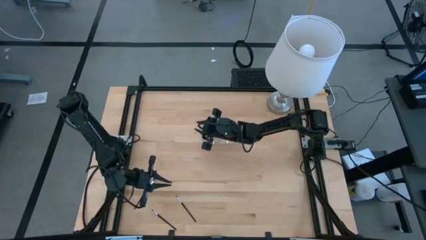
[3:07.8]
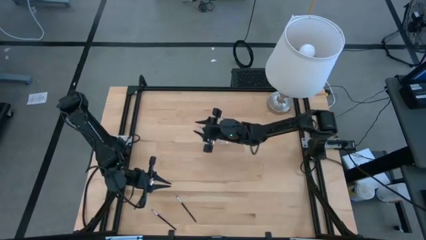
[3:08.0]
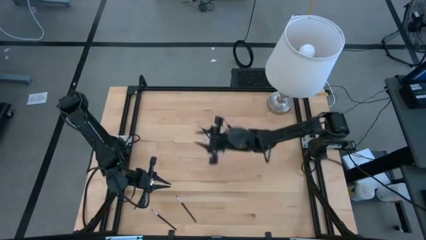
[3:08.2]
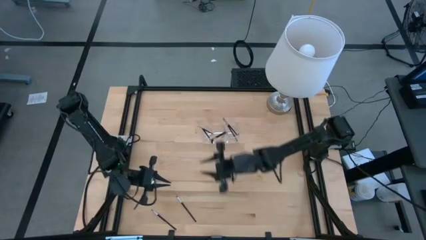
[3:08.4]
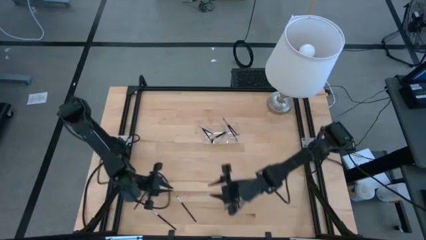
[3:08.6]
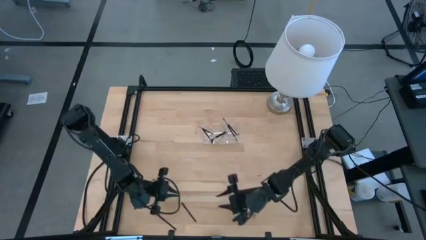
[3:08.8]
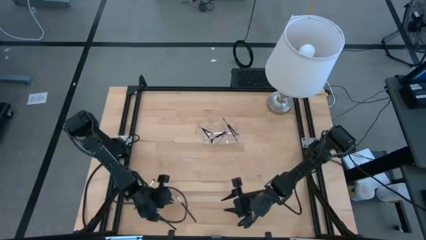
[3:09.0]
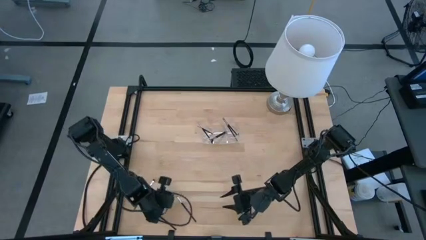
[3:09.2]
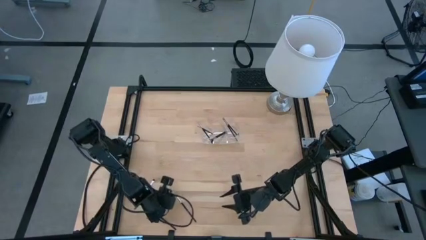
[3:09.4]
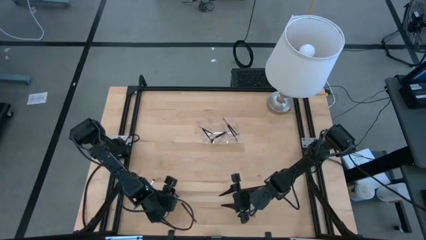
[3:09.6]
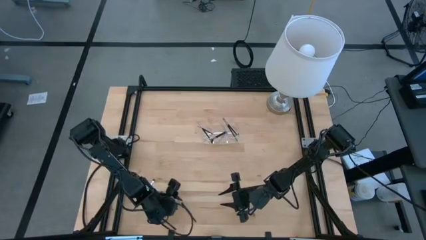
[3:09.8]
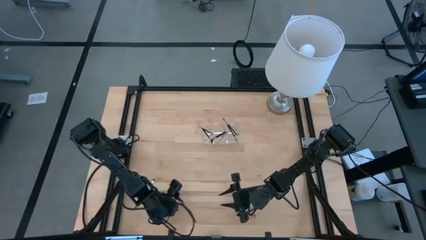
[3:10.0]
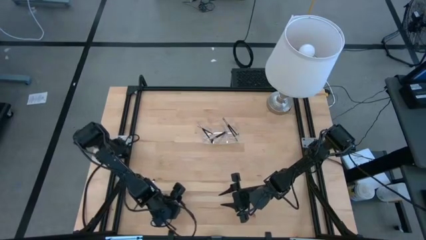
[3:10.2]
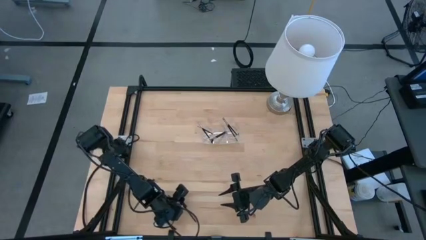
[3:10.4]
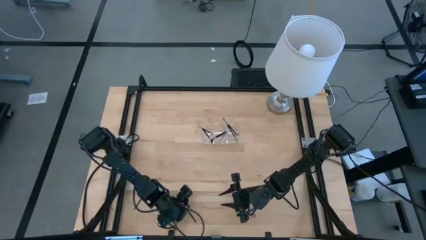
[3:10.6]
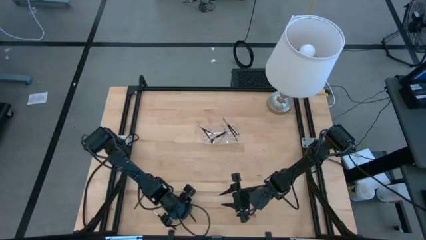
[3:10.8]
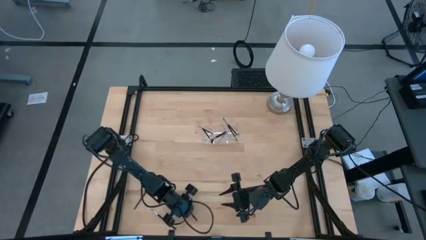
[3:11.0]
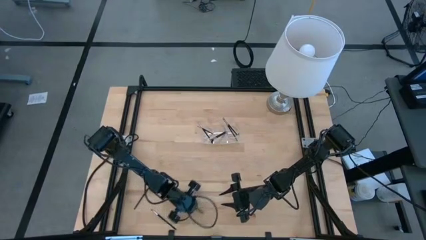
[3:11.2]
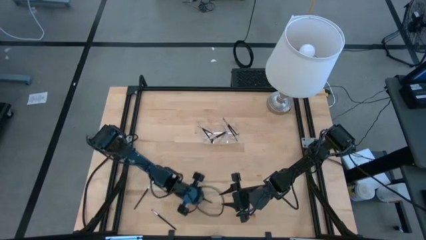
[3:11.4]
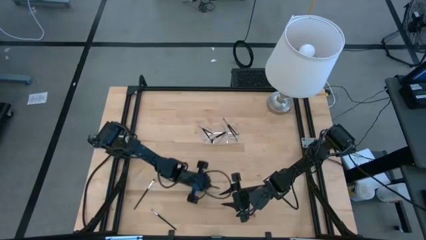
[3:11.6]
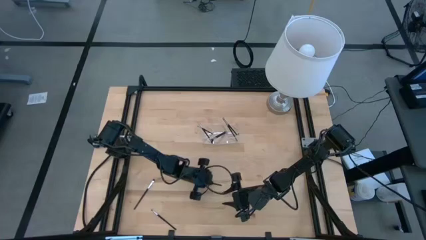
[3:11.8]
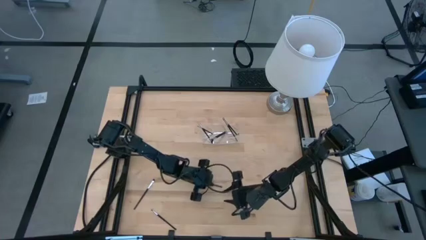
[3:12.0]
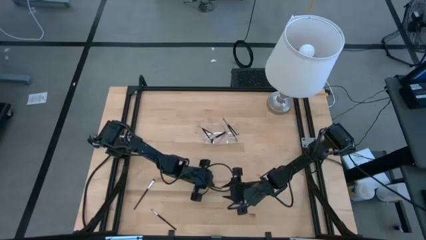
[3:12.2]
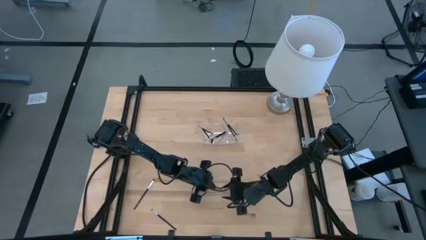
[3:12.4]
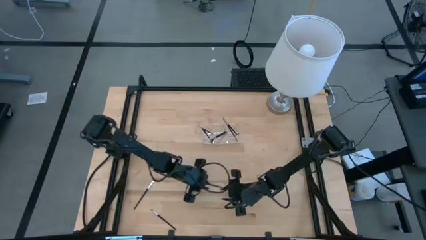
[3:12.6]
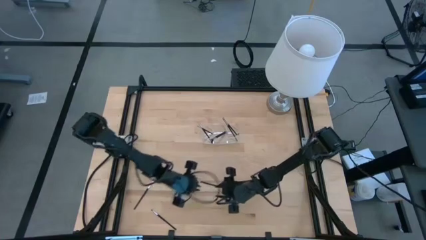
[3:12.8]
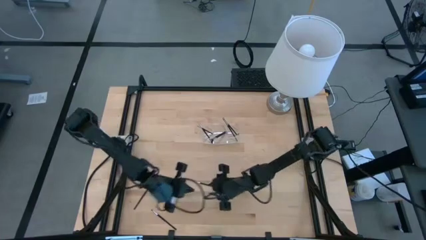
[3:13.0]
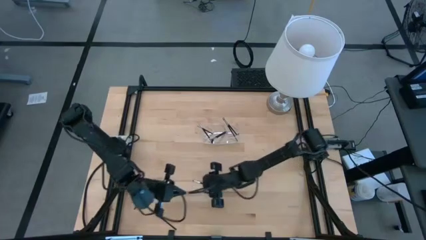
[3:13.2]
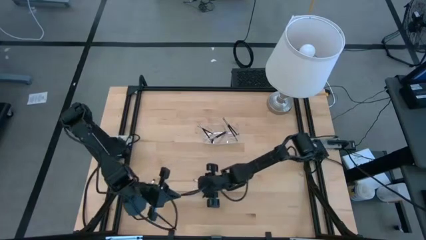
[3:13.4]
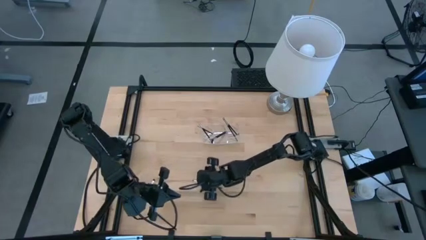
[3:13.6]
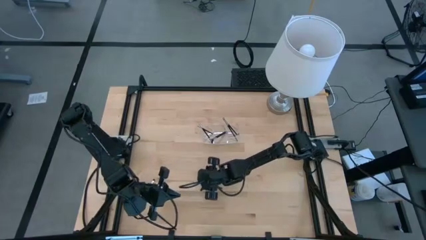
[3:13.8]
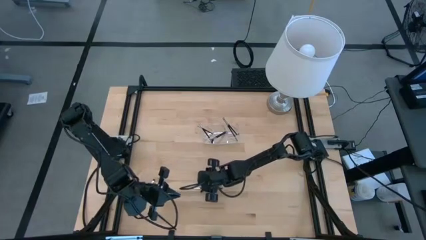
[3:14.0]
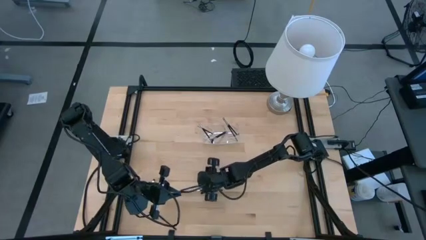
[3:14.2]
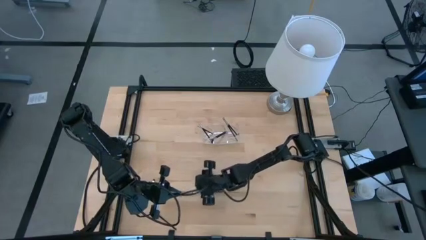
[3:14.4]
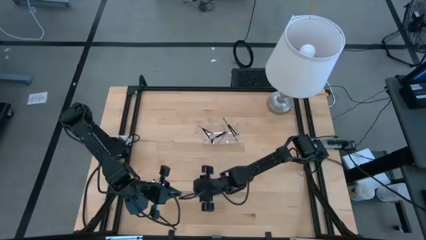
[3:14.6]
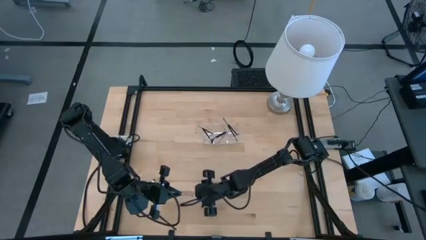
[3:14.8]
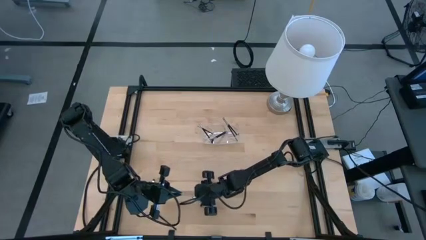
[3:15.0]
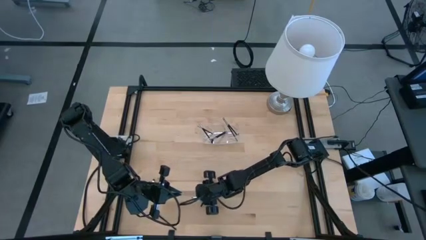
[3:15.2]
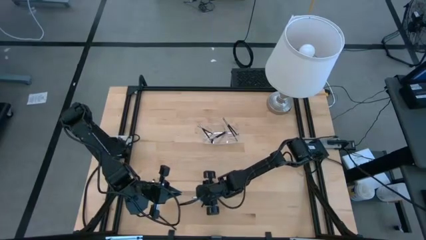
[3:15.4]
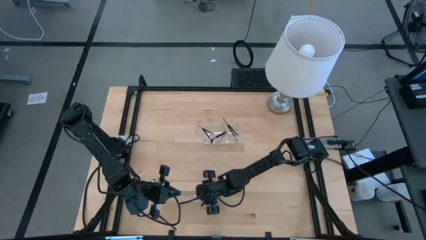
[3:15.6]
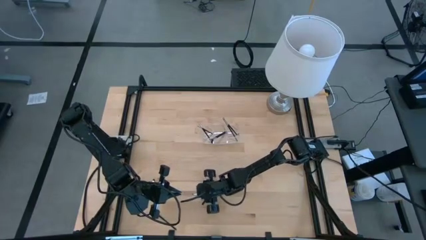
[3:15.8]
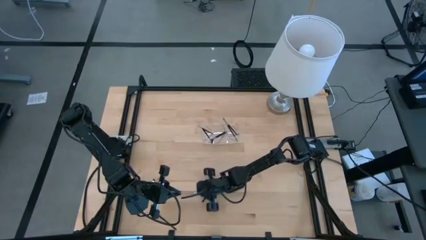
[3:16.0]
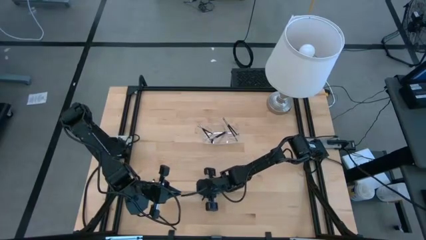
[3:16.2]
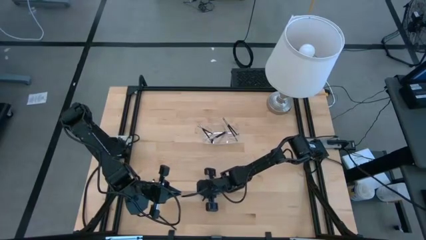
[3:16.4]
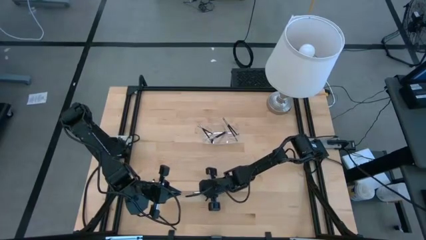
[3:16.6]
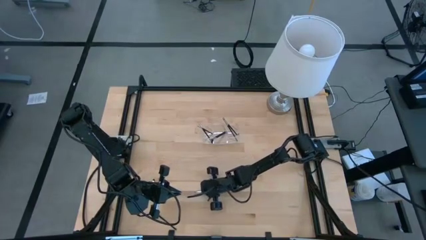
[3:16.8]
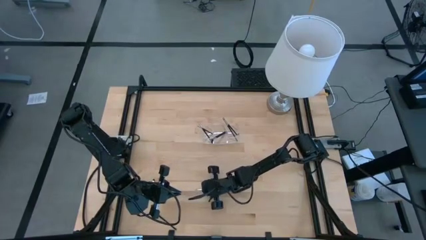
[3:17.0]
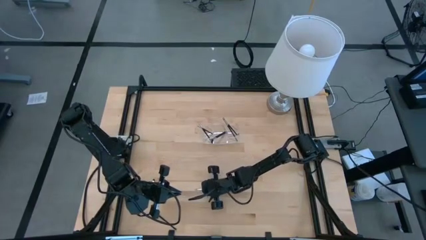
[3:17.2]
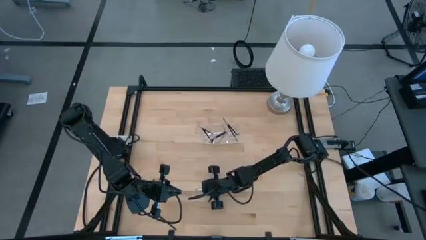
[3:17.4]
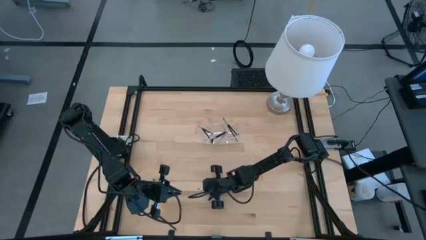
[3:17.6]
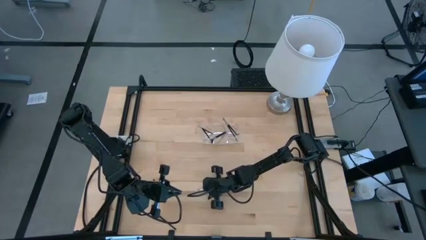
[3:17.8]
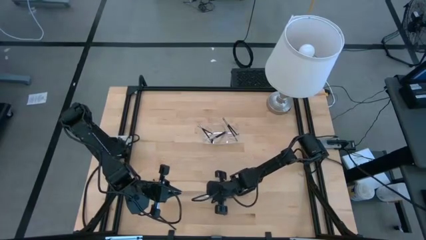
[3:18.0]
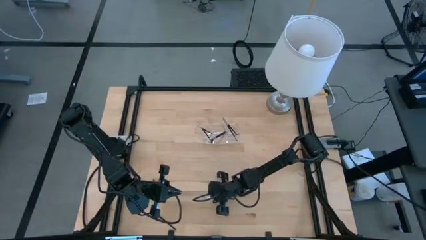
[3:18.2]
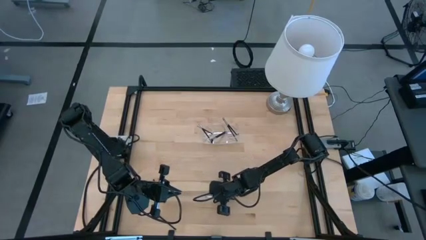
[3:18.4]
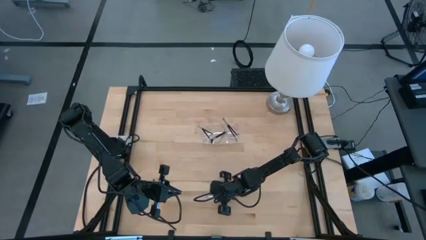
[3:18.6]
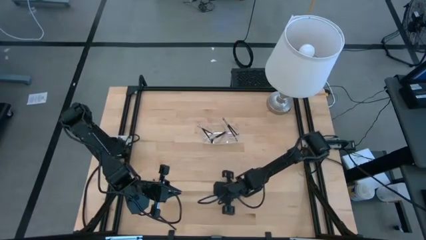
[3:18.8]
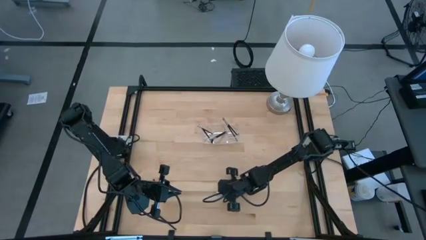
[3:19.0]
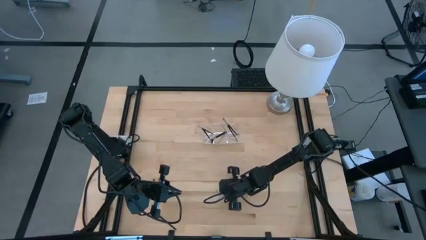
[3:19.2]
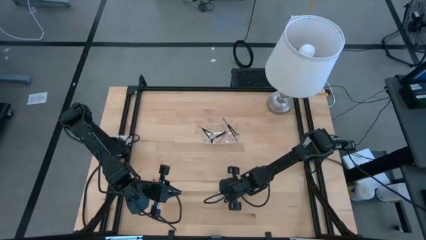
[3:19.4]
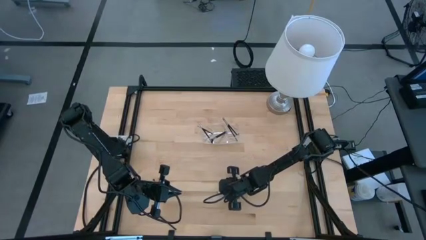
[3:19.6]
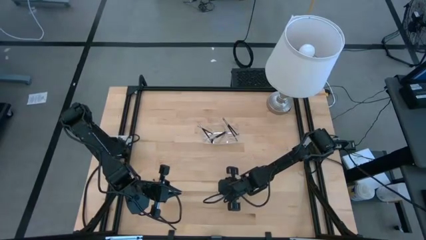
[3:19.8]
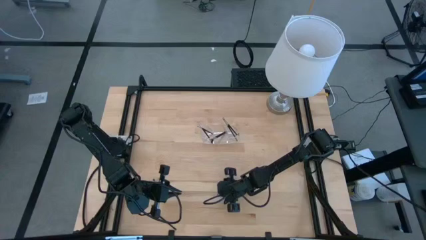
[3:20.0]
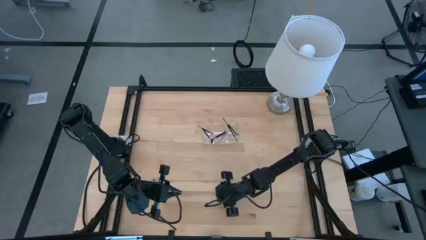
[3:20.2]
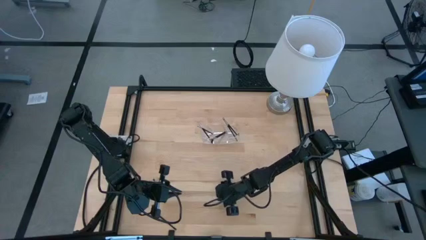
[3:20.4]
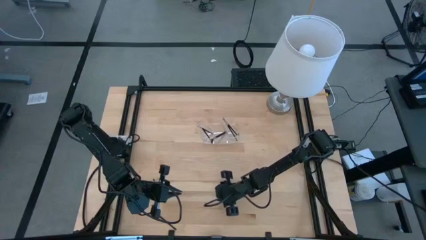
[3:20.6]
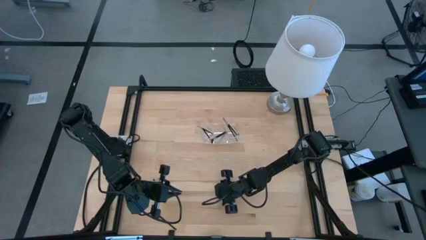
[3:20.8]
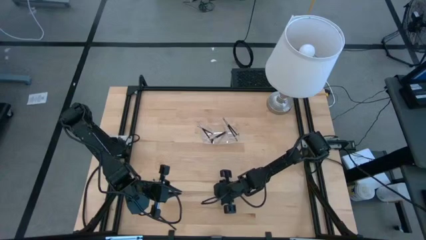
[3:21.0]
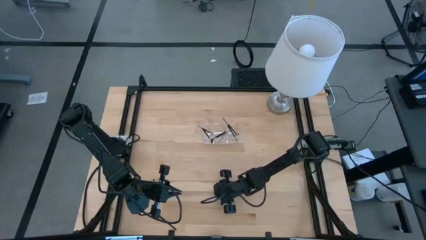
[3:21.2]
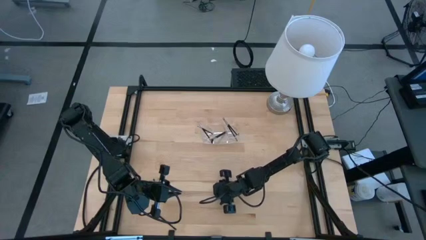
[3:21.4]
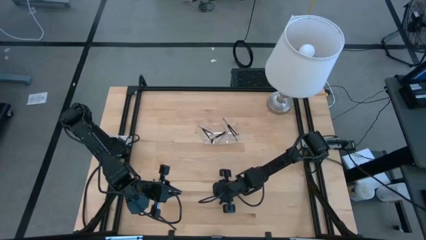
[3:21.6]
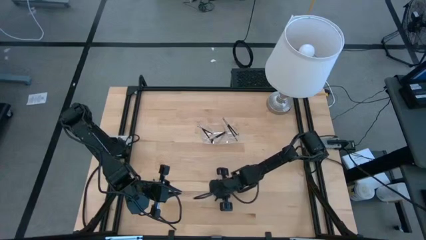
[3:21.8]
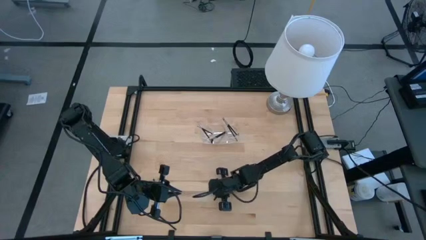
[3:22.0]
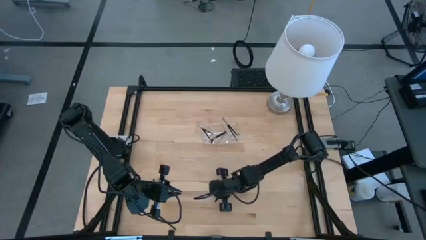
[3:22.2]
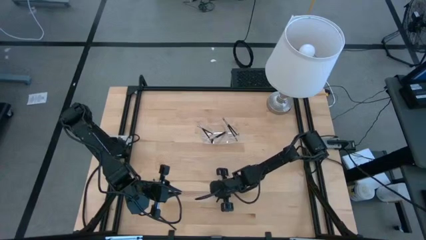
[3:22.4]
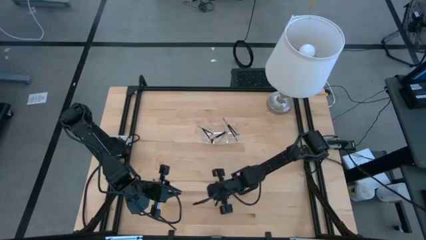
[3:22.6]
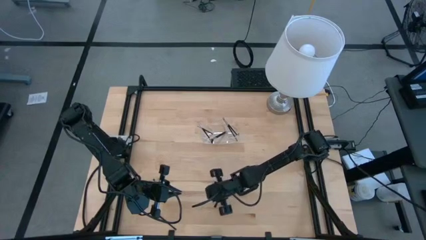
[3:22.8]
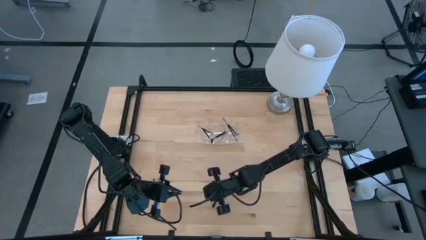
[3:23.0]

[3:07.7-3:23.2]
Task: Pick & Place Makeup Supplies
Put the makeup brush into the transparent organizer

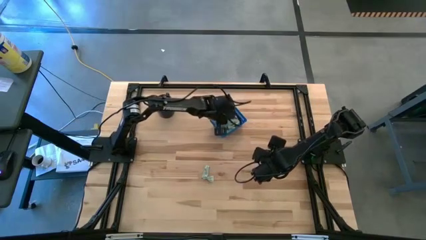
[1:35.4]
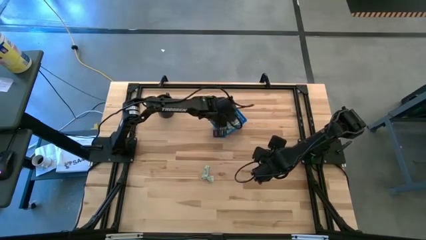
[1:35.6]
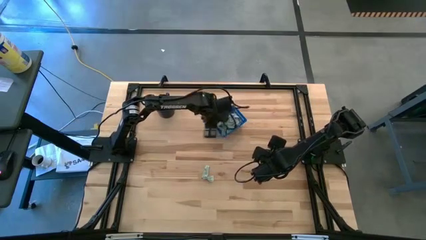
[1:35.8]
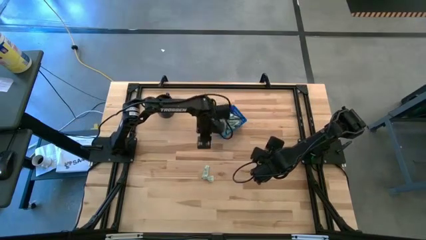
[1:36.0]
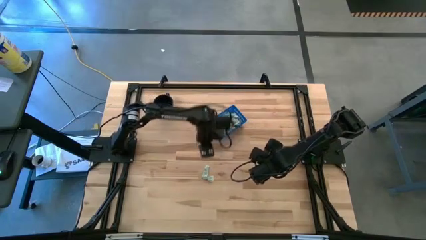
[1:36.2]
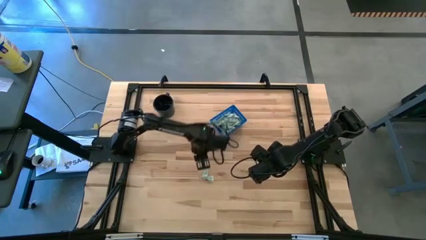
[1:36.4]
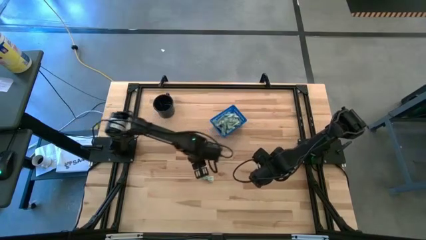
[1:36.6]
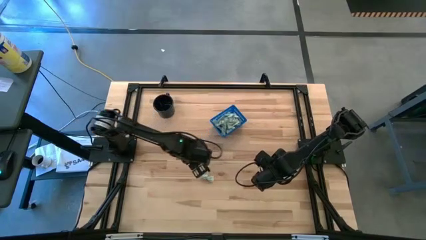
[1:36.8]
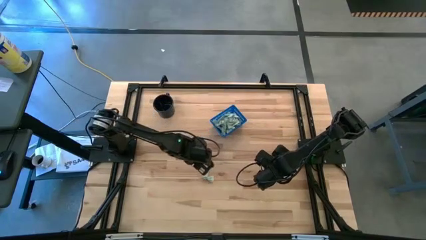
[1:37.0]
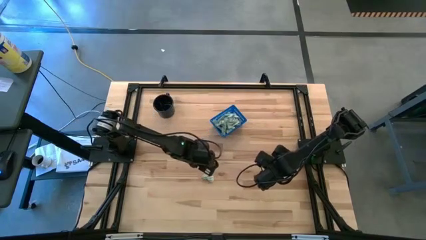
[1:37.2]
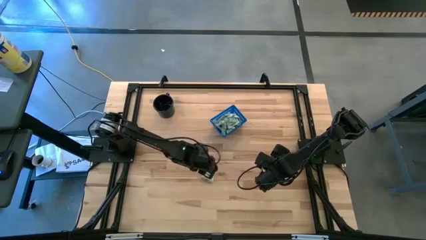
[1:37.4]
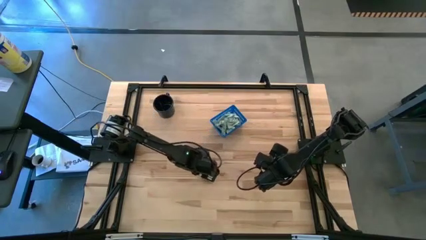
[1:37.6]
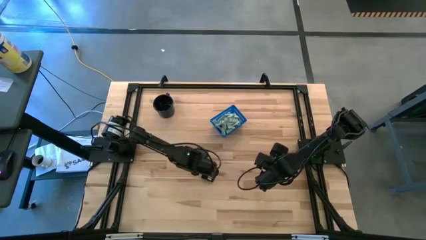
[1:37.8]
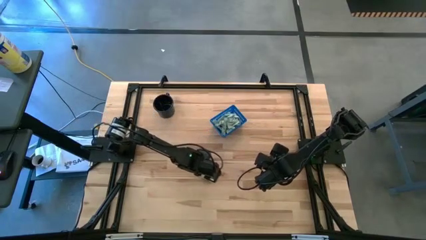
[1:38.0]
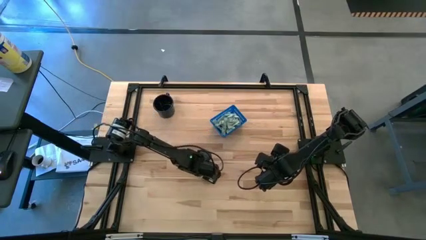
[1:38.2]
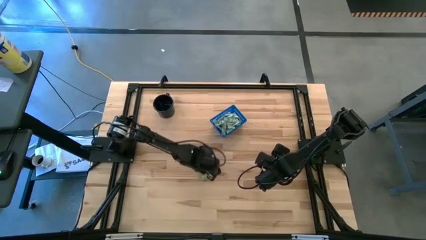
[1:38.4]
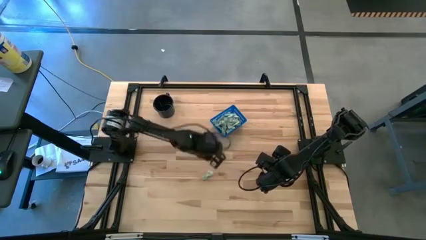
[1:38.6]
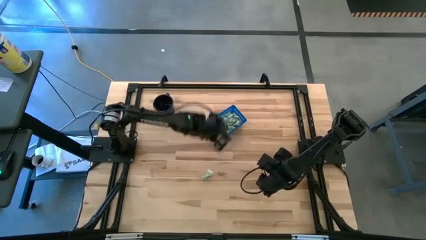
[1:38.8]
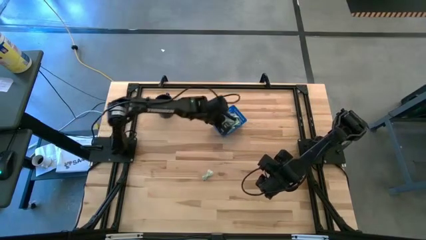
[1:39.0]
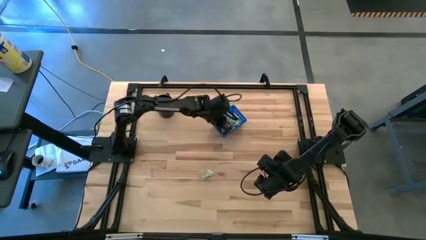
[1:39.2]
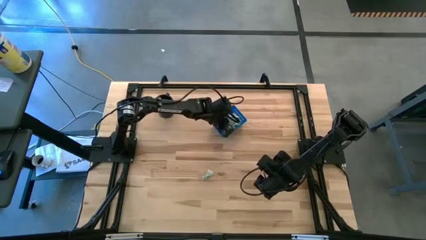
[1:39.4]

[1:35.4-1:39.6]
Task: Pick and place Stevia / Truvia into bins
Put the green stevia packet into the blue bin
